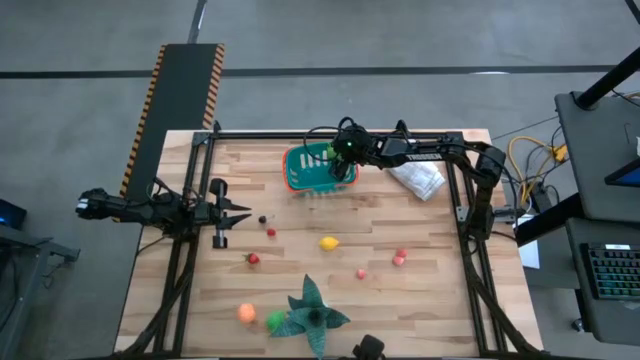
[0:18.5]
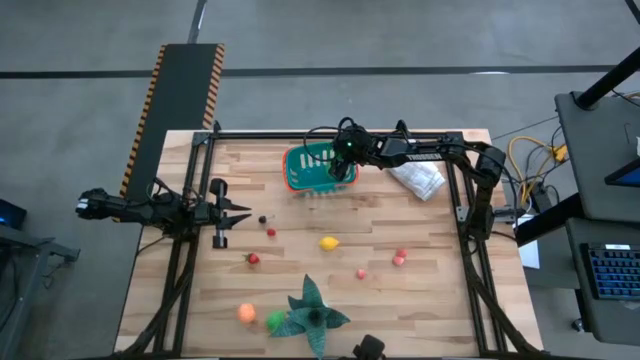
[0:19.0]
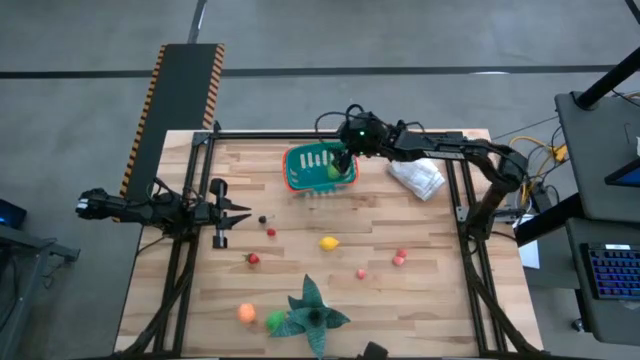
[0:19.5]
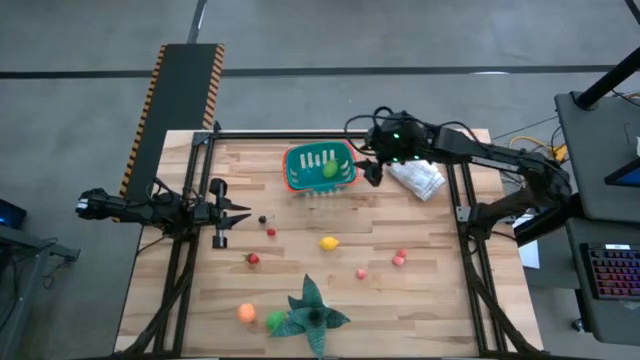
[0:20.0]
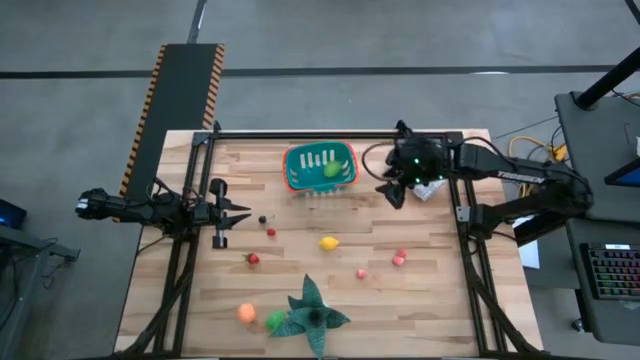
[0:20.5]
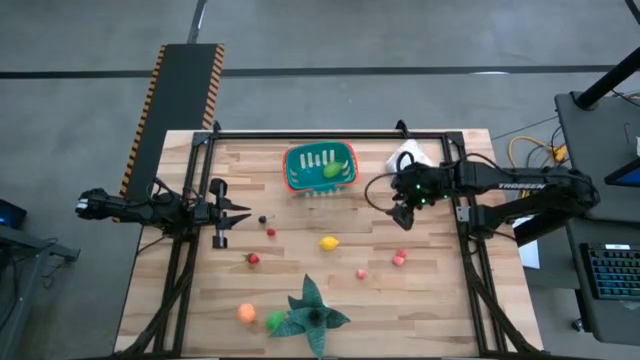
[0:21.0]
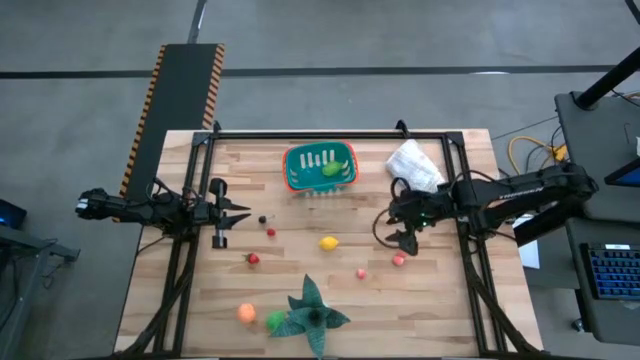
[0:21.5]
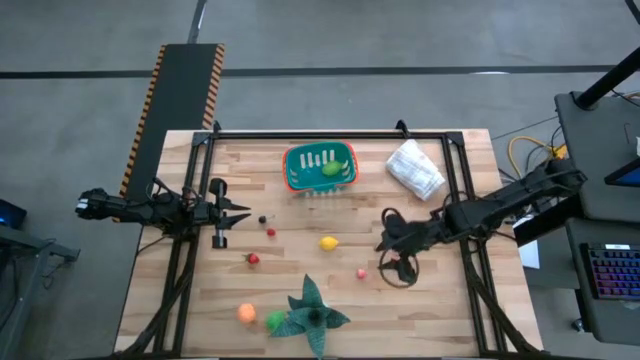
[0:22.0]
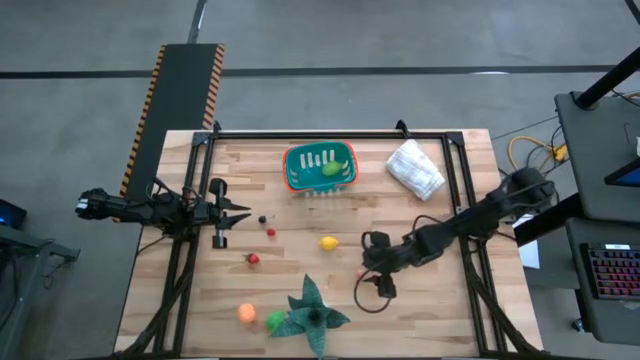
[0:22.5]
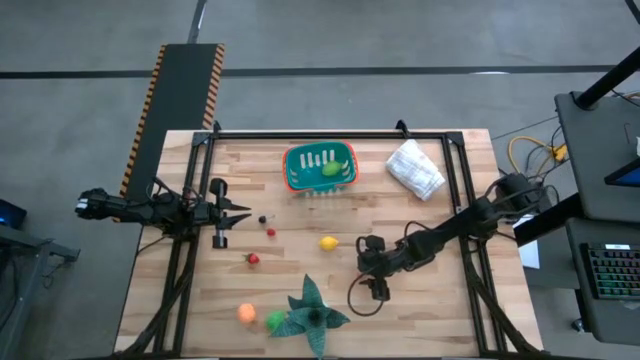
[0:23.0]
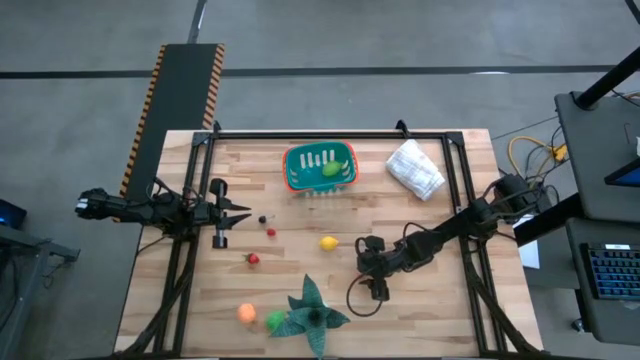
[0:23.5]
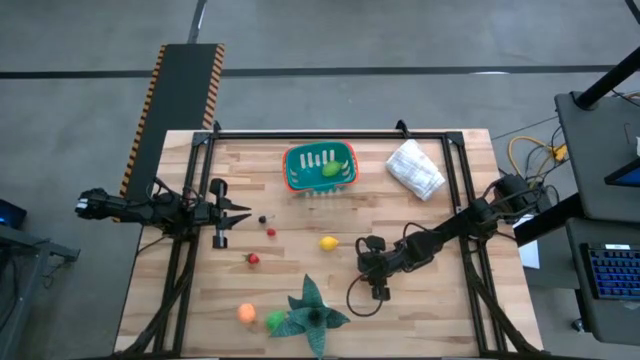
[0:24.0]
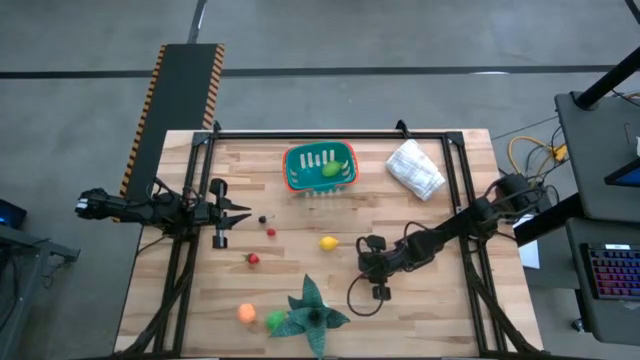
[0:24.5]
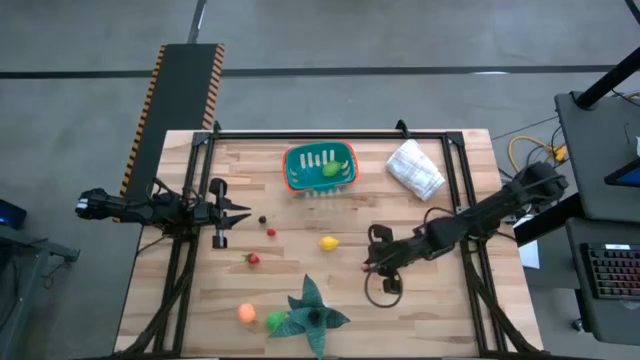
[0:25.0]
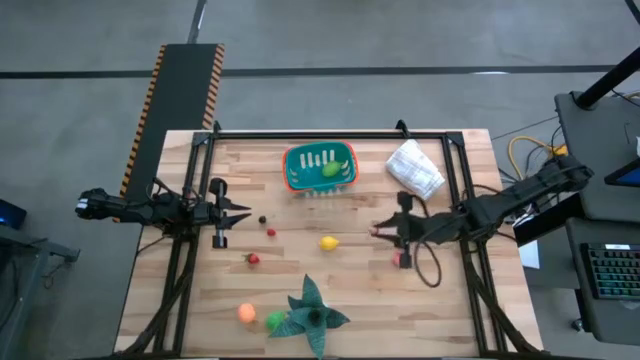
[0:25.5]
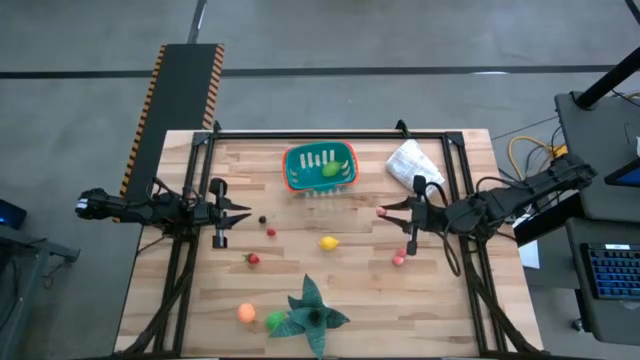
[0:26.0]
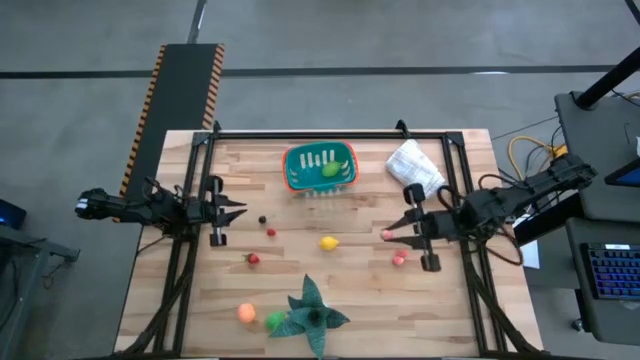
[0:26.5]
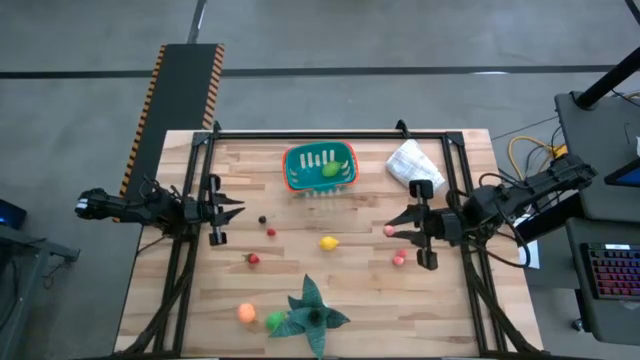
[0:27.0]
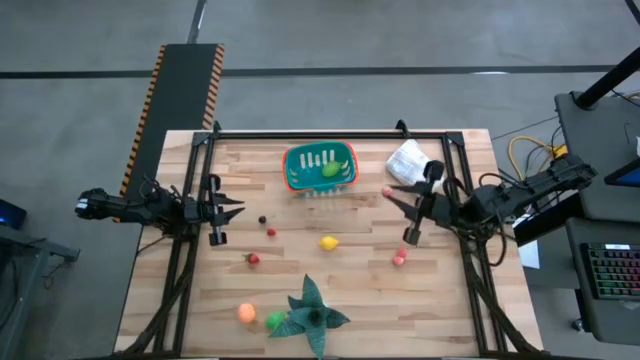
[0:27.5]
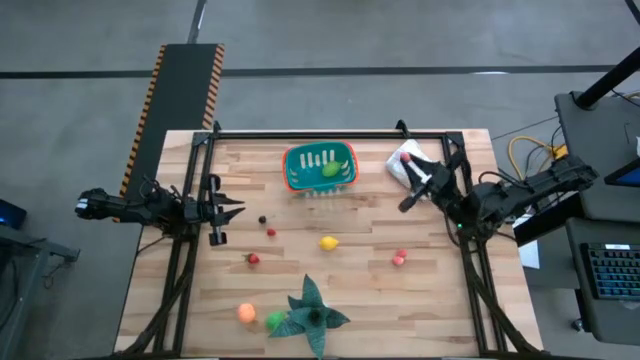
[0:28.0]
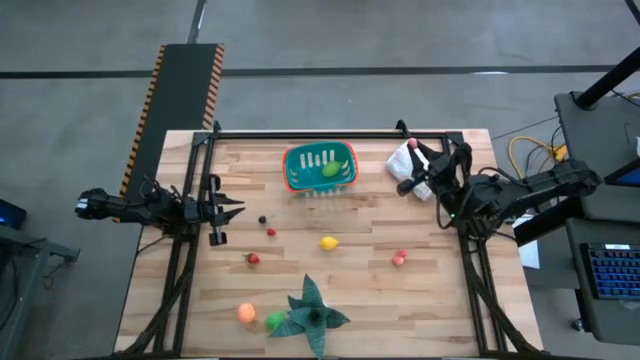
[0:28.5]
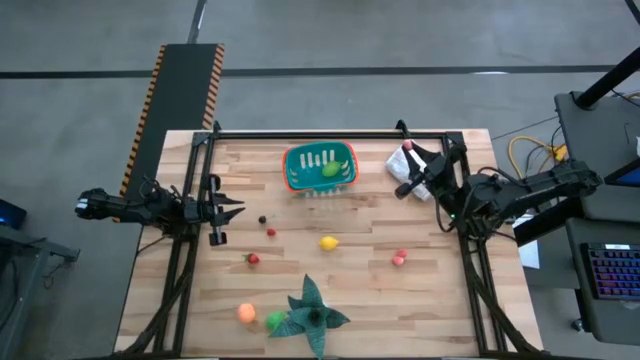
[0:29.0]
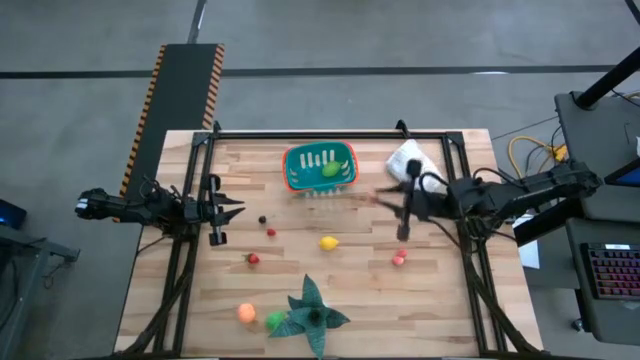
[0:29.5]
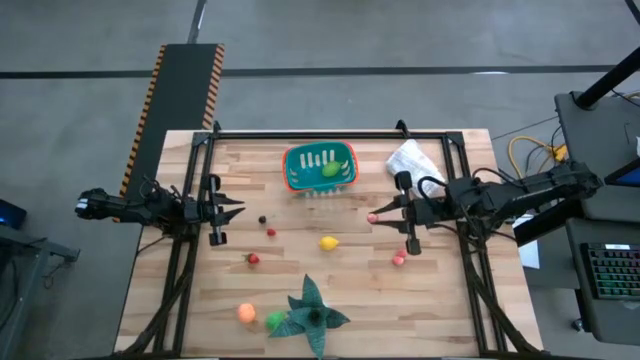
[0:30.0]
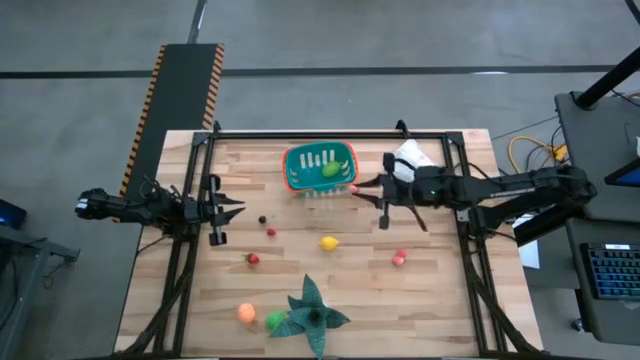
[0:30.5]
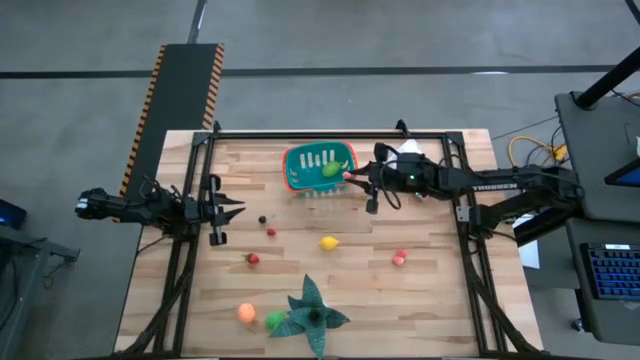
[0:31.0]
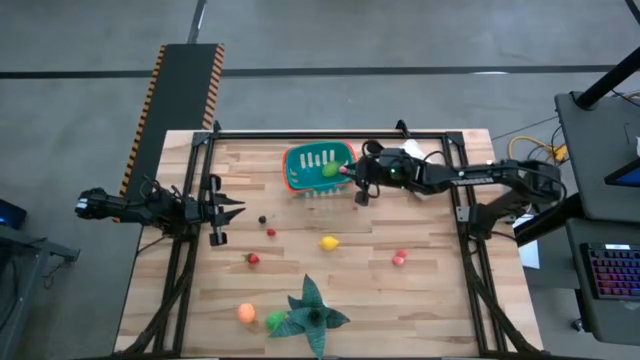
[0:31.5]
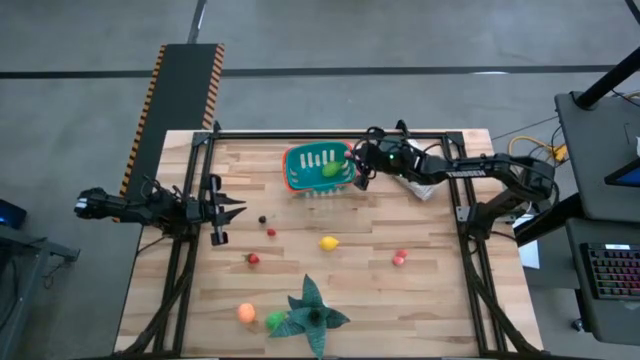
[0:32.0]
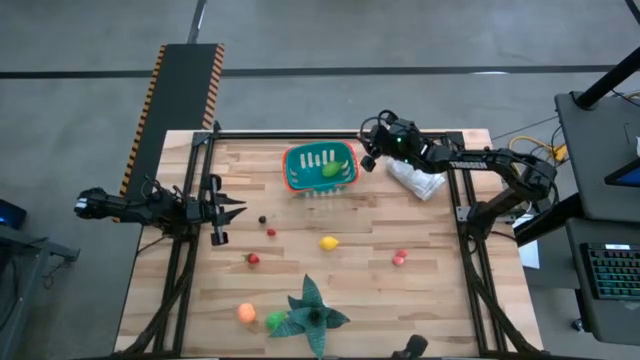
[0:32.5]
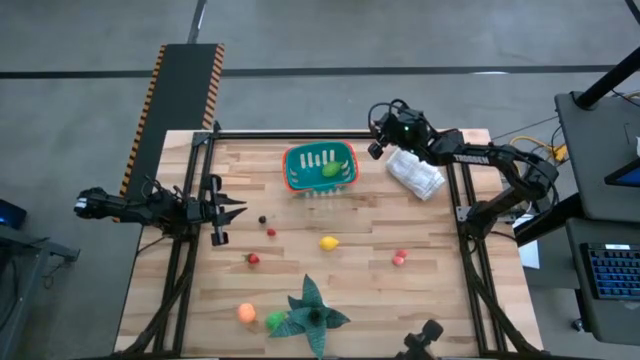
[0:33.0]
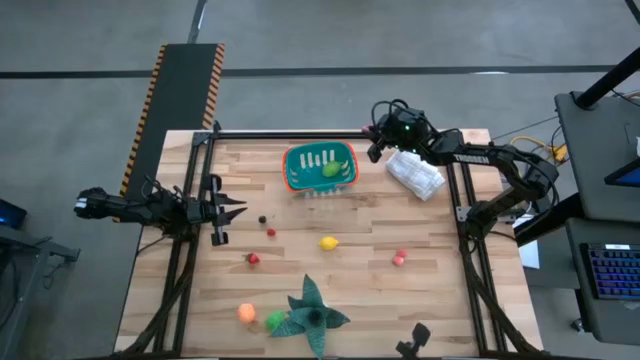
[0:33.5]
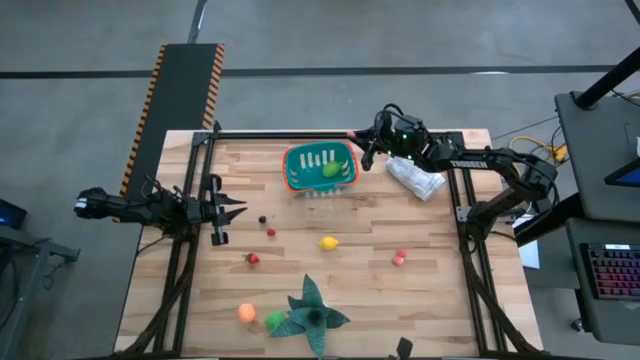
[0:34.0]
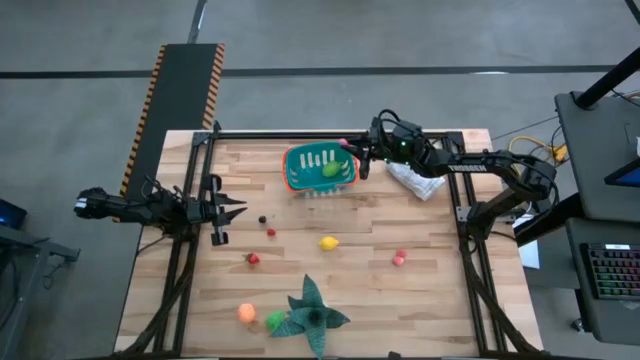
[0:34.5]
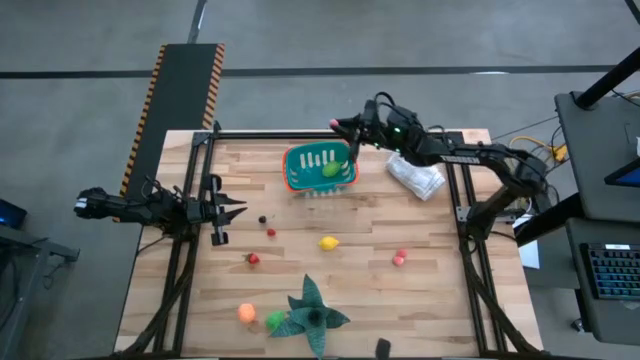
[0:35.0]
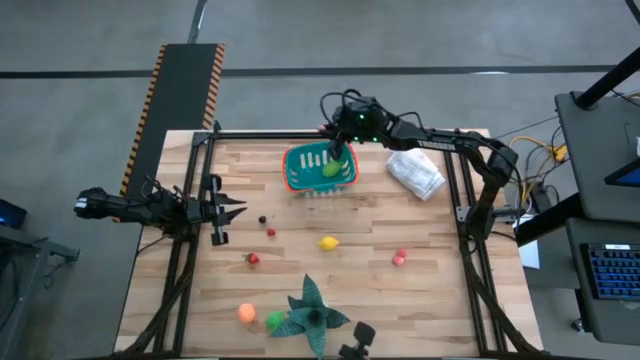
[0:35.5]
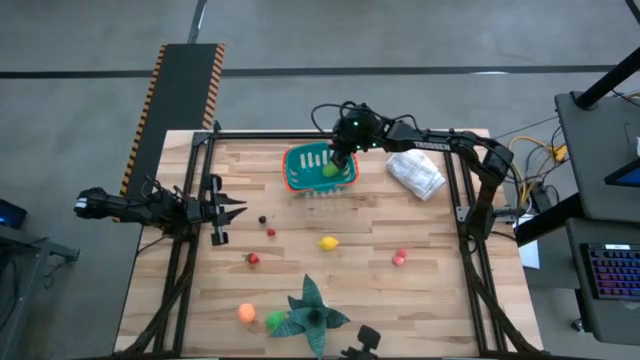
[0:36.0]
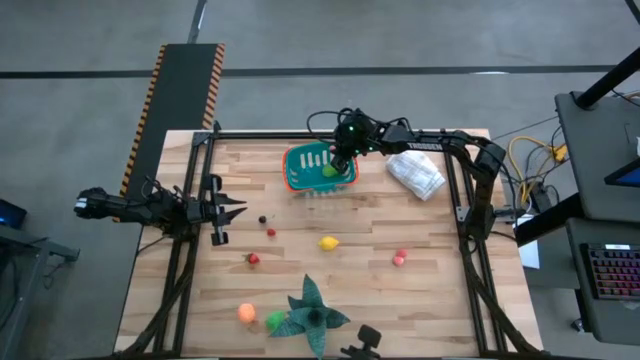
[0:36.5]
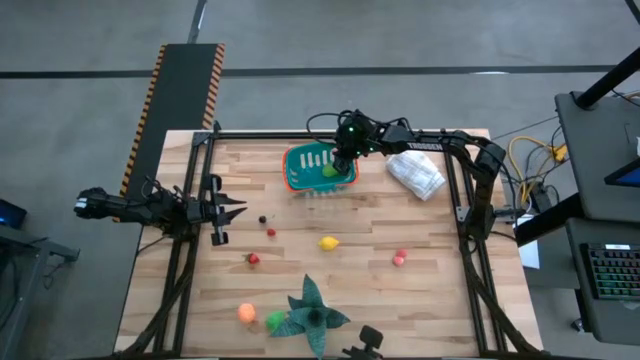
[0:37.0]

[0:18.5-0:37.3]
Task: Pick and placing Produce into tupperware
Put the peach toy into the bin
